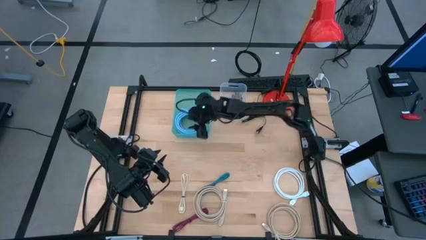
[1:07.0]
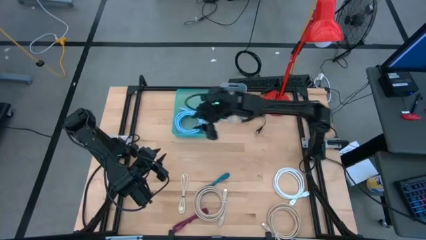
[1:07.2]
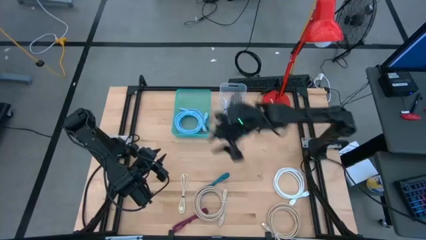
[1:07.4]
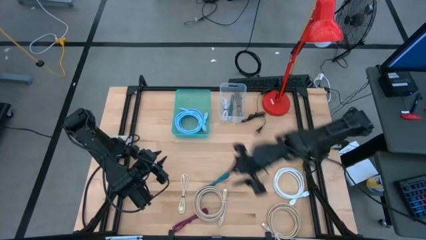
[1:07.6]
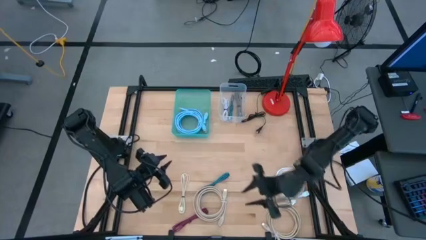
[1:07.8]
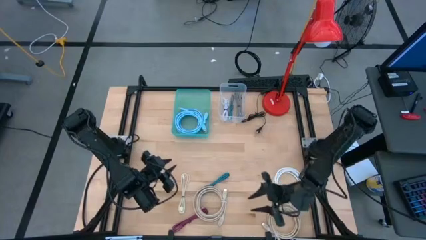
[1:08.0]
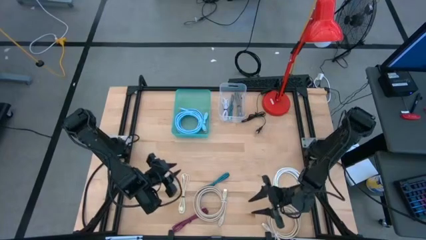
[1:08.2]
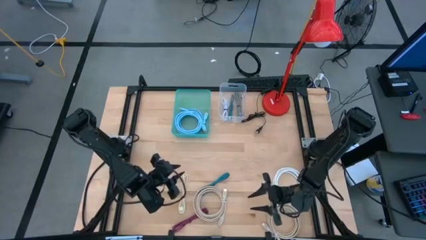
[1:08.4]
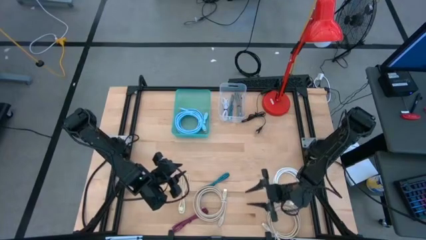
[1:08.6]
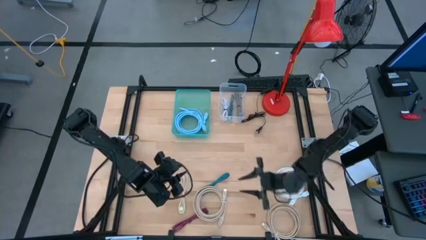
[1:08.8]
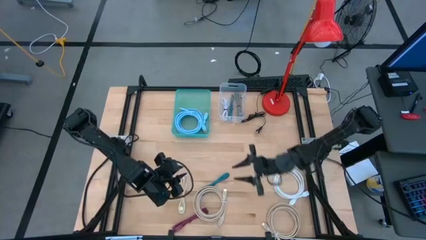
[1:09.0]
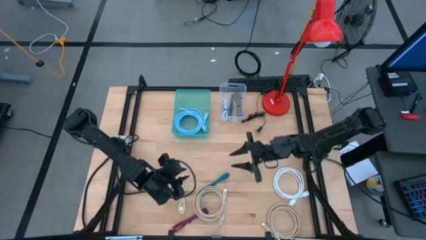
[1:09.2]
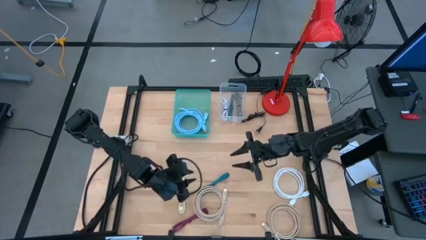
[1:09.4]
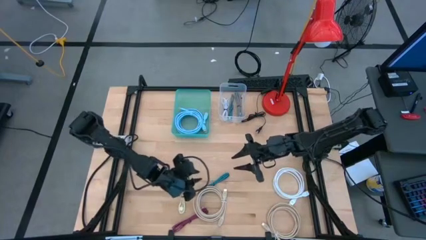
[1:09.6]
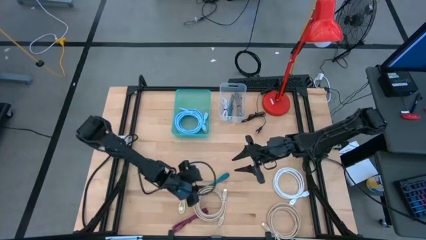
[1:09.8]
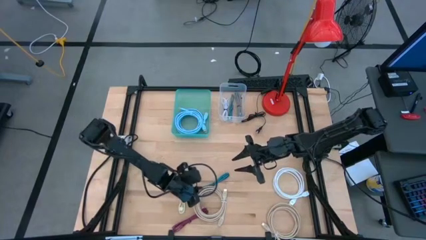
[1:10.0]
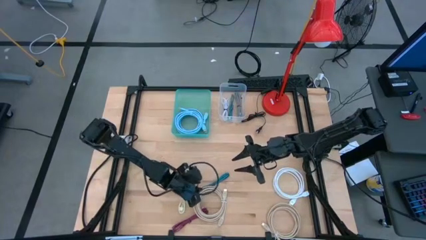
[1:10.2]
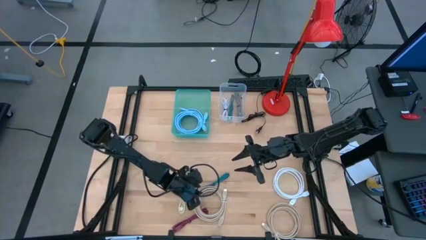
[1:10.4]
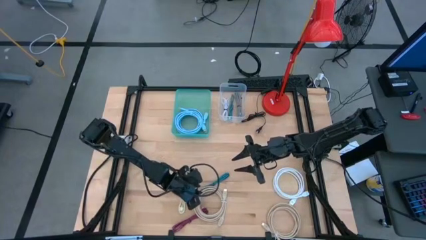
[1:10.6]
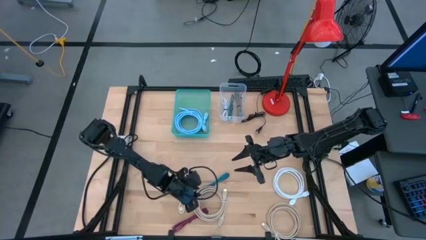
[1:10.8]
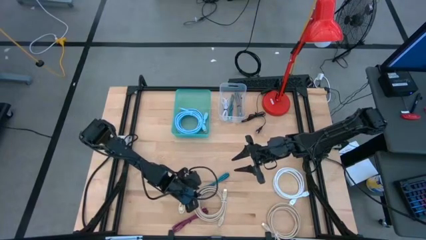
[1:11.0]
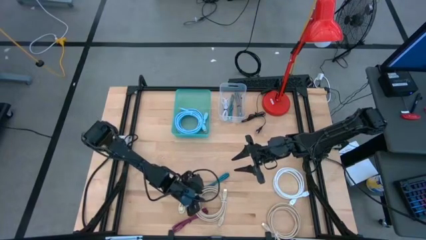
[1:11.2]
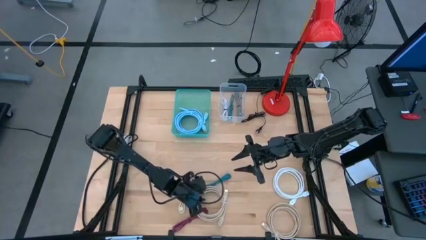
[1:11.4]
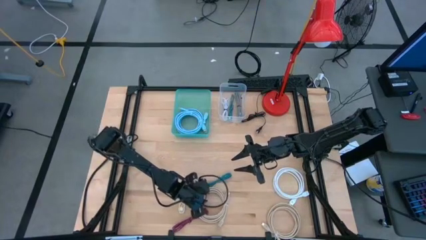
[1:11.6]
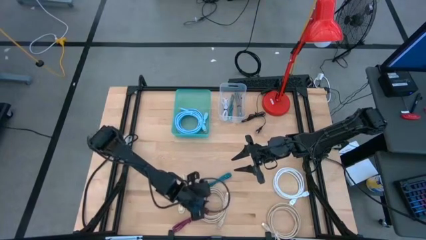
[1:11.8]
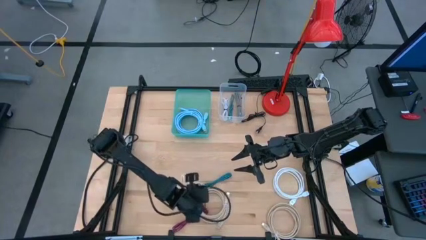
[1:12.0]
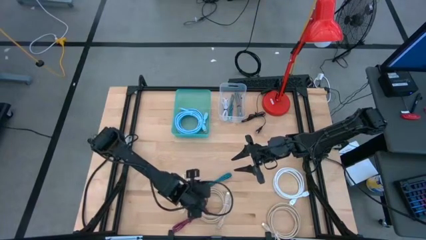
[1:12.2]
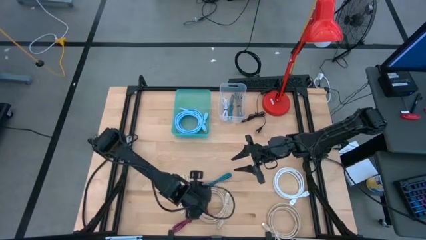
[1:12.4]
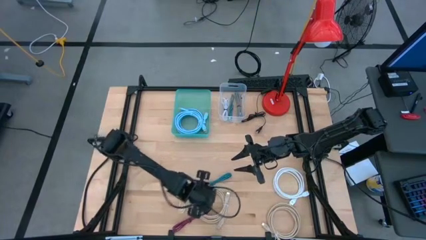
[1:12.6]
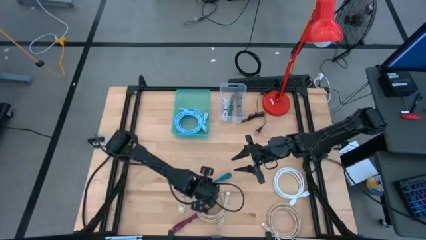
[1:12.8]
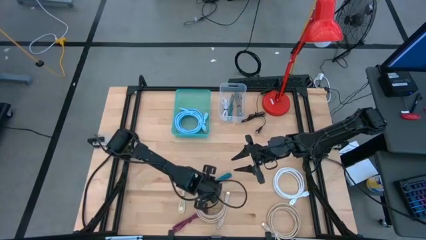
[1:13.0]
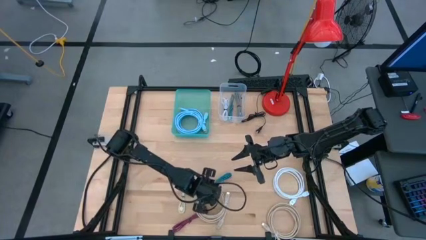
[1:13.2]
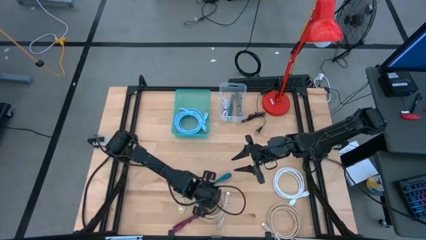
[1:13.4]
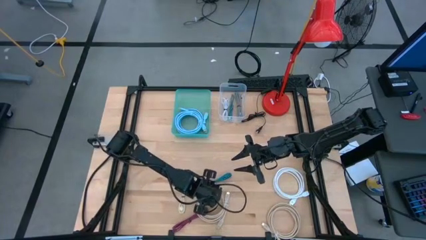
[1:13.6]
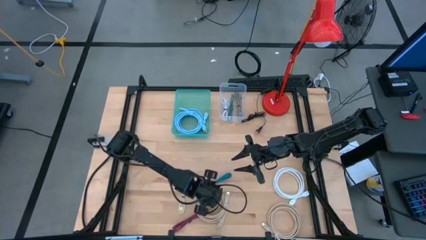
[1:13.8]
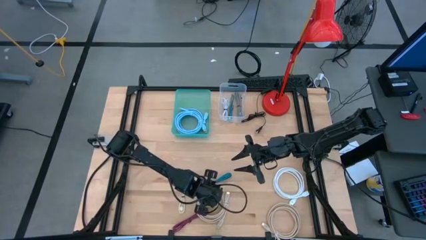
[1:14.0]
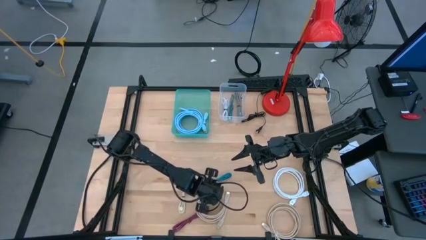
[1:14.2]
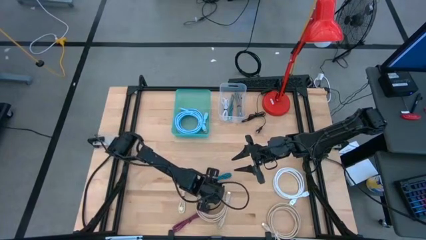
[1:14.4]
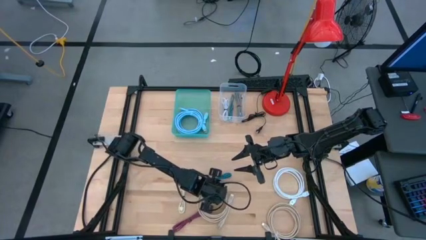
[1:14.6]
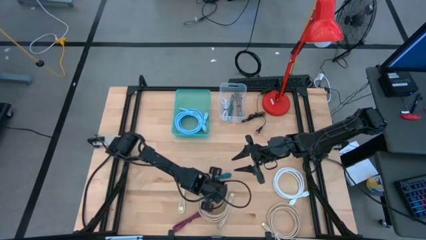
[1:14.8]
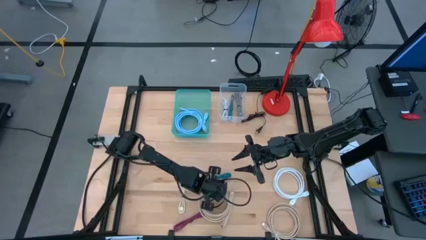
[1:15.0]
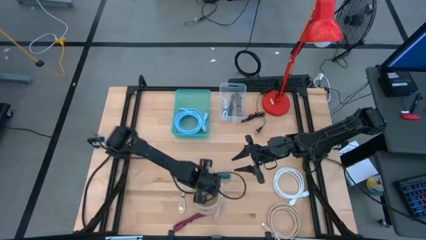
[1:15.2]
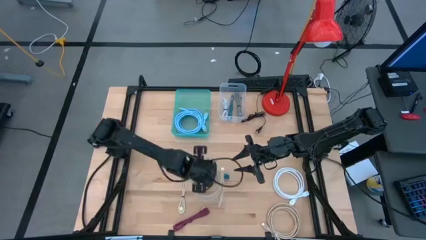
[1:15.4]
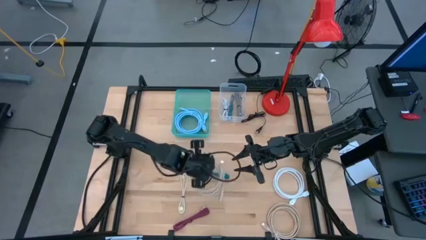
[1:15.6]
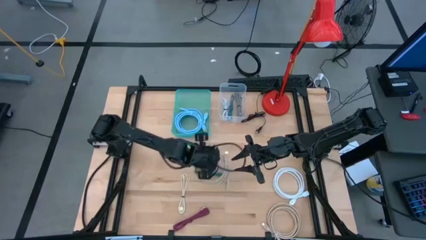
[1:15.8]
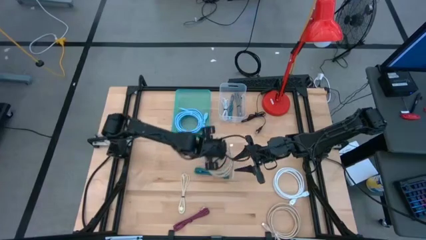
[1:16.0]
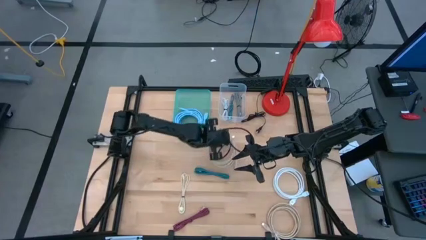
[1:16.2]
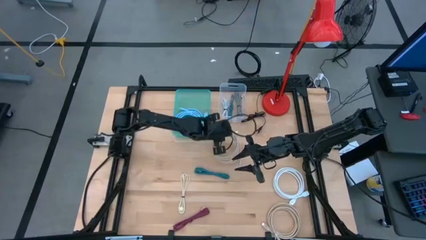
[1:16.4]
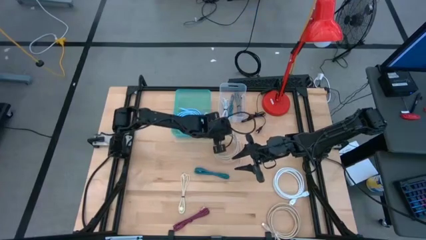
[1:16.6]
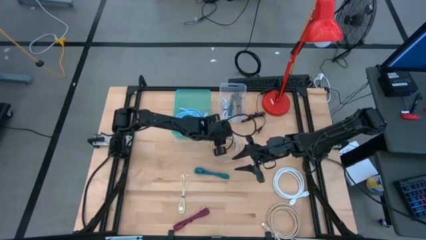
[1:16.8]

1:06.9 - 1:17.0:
Task: Pick and place items into bin
Move the left light brown HDMI cable to the center of the table

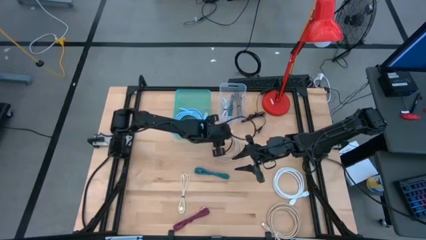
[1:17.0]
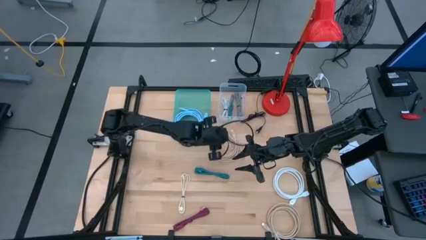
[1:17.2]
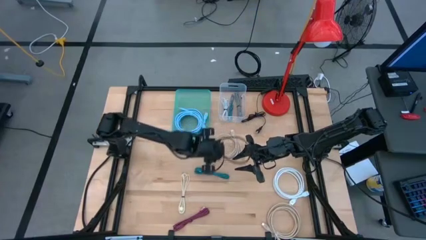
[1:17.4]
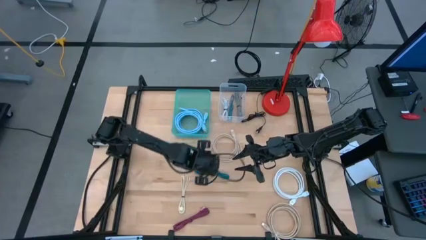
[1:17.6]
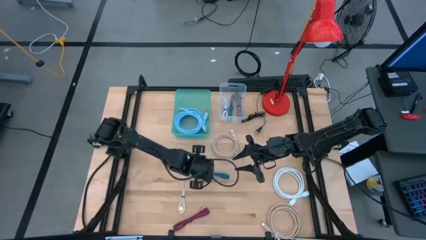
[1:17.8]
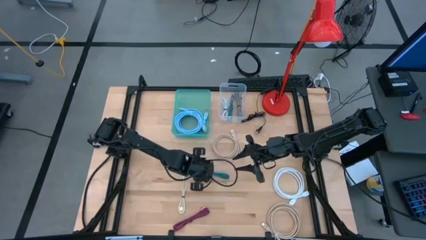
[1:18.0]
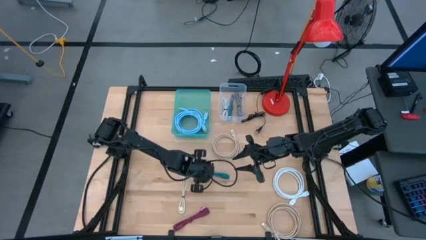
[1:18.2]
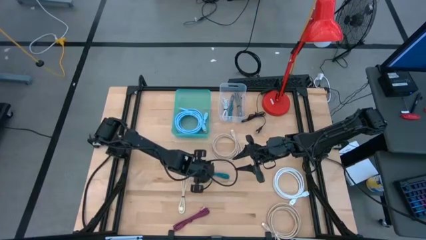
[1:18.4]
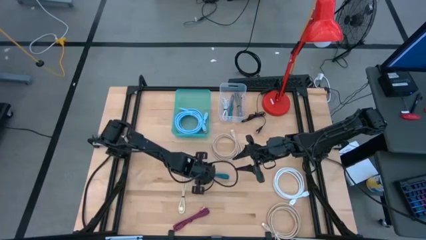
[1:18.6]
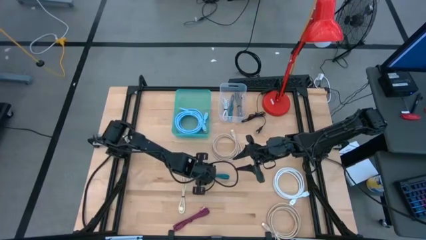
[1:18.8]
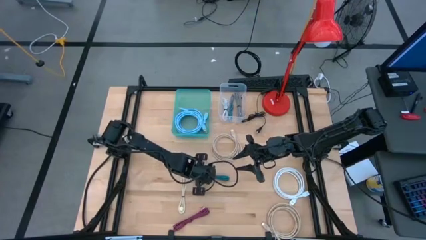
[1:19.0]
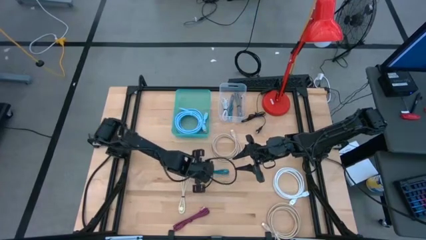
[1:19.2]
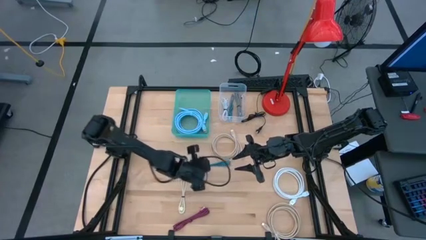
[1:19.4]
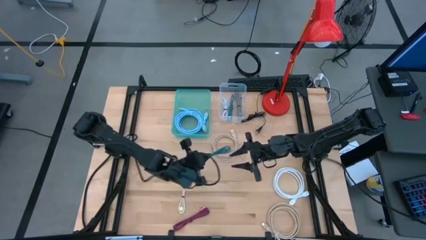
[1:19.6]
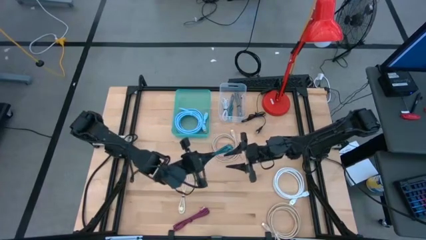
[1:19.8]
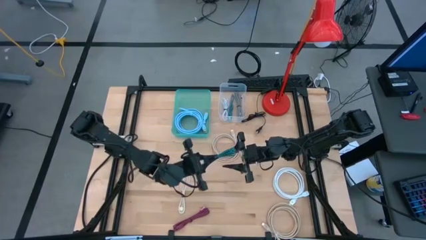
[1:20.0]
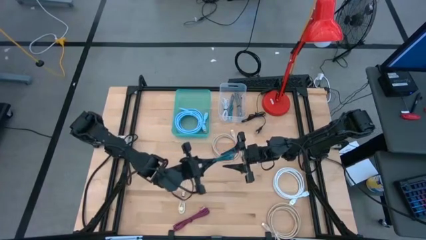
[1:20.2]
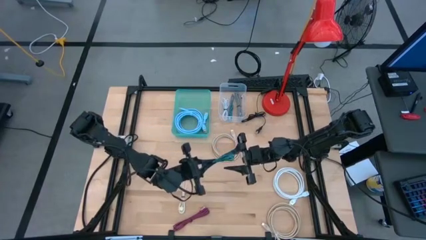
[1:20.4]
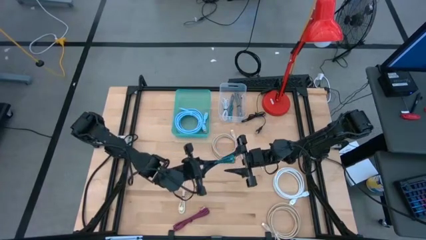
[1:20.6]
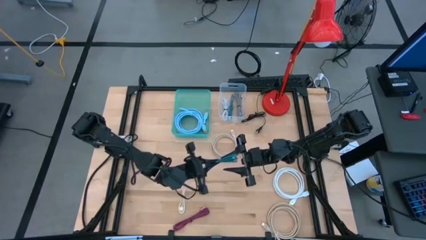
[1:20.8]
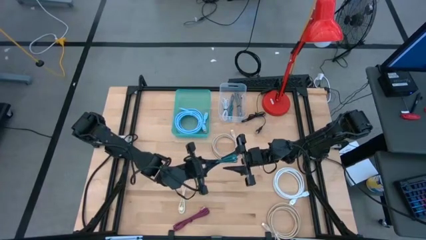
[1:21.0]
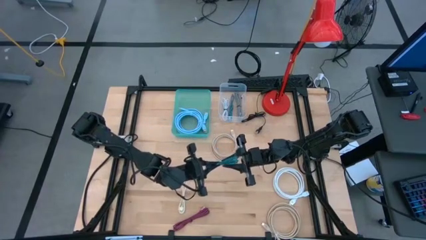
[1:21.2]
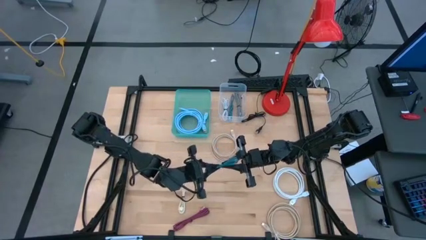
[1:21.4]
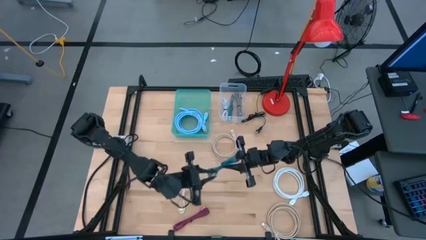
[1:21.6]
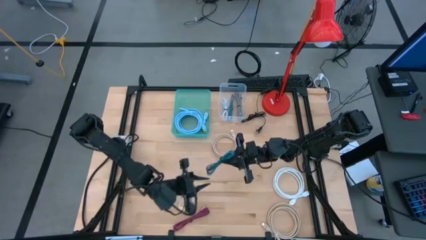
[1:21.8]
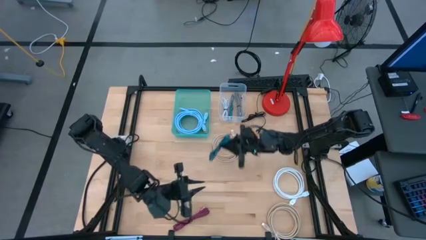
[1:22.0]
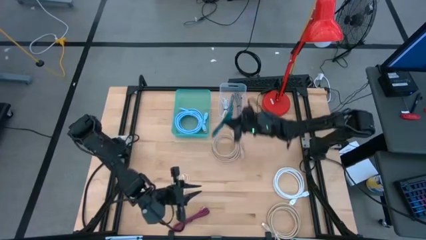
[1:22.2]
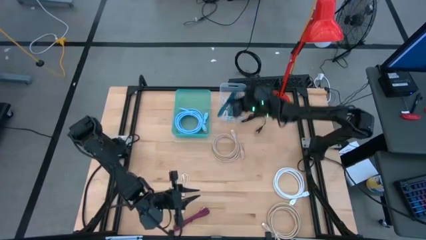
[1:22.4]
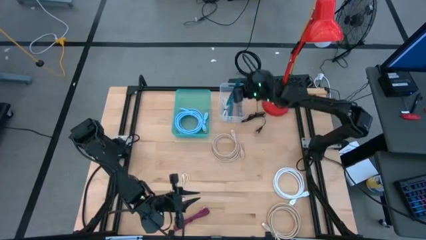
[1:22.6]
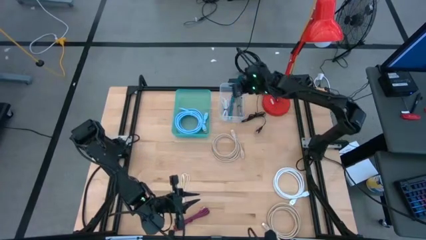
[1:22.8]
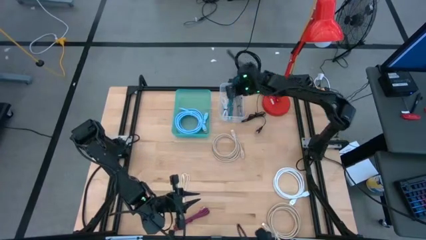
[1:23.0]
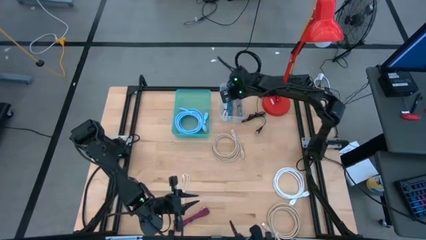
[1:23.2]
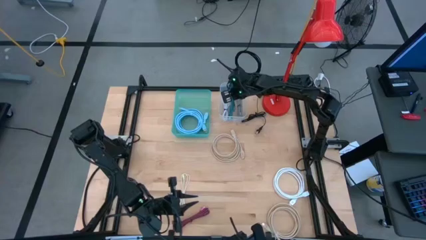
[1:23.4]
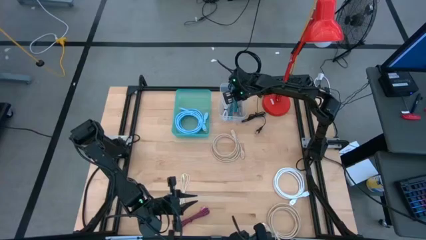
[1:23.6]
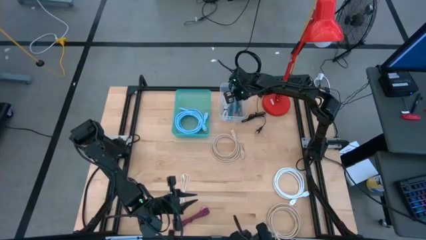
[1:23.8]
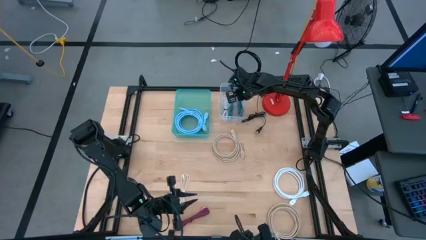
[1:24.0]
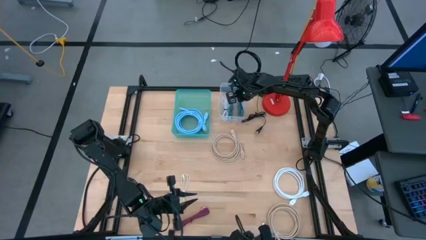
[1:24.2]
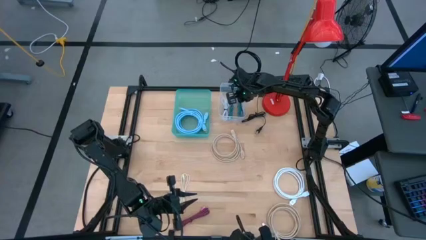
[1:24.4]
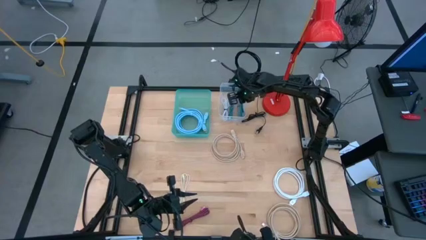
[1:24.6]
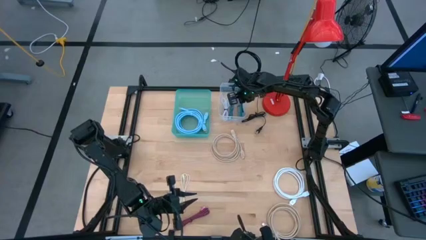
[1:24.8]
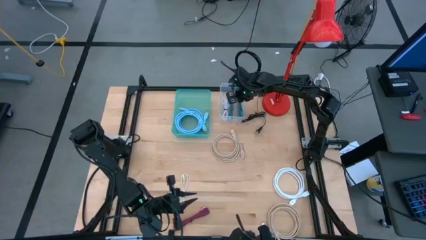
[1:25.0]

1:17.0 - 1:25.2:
Put the black blue charger cable into the transparent bin
